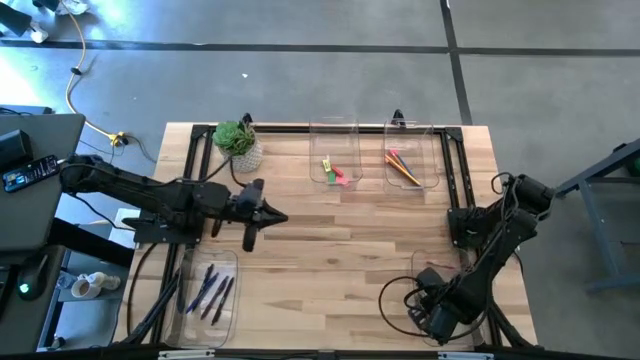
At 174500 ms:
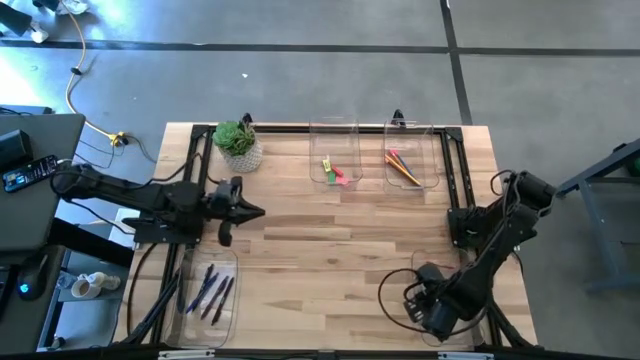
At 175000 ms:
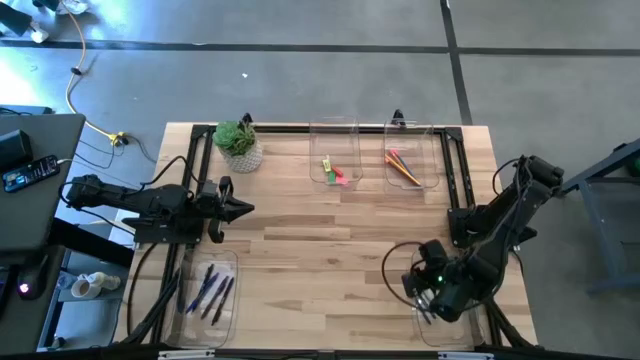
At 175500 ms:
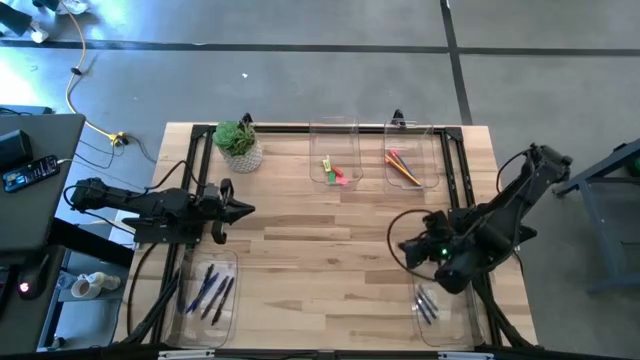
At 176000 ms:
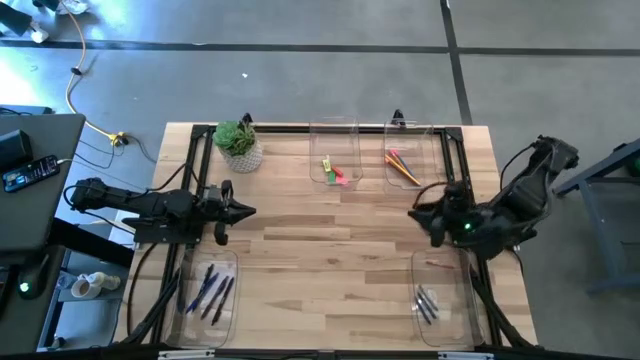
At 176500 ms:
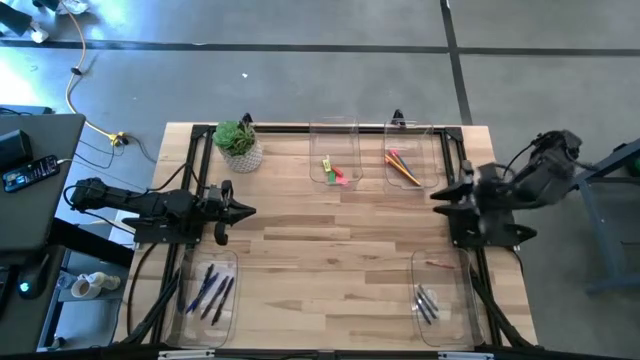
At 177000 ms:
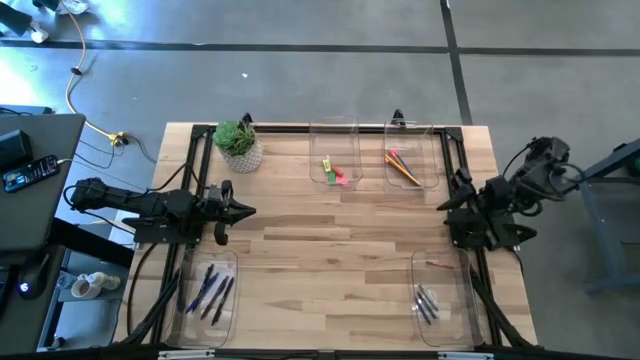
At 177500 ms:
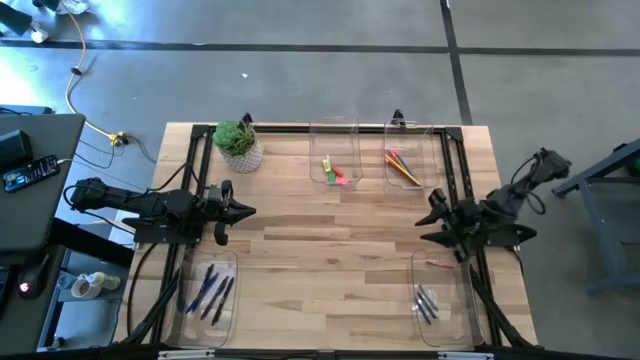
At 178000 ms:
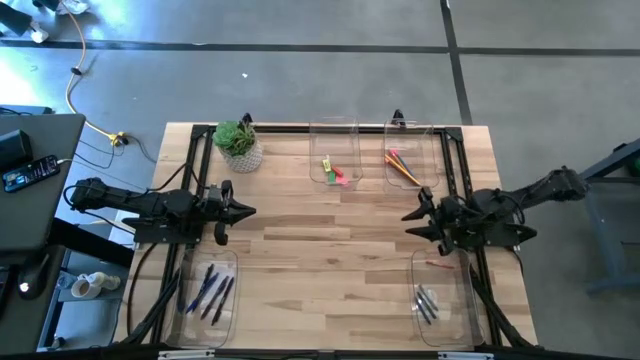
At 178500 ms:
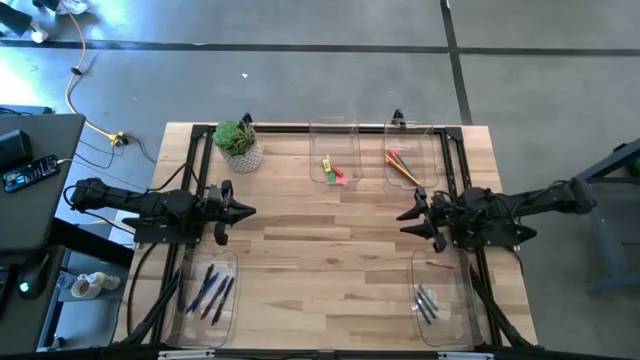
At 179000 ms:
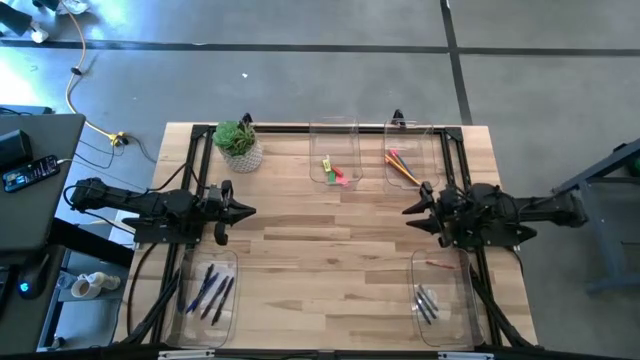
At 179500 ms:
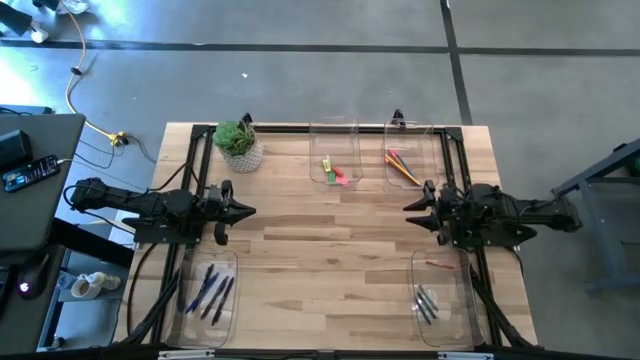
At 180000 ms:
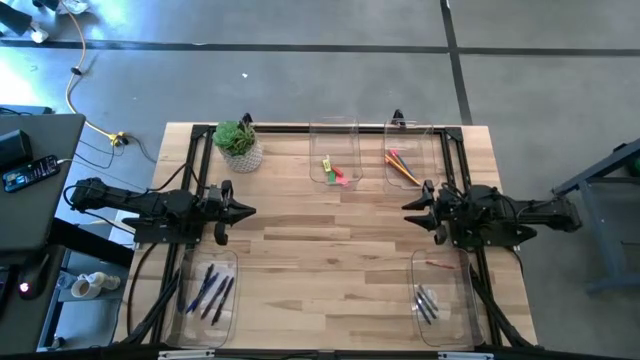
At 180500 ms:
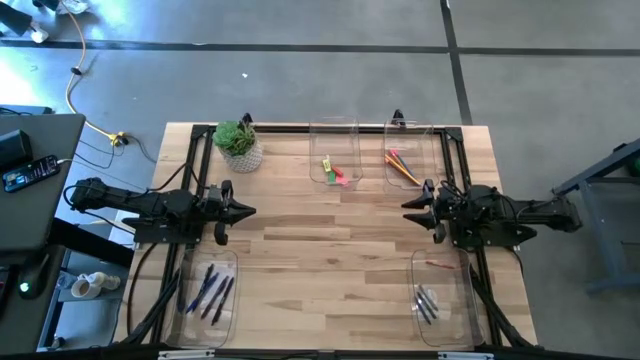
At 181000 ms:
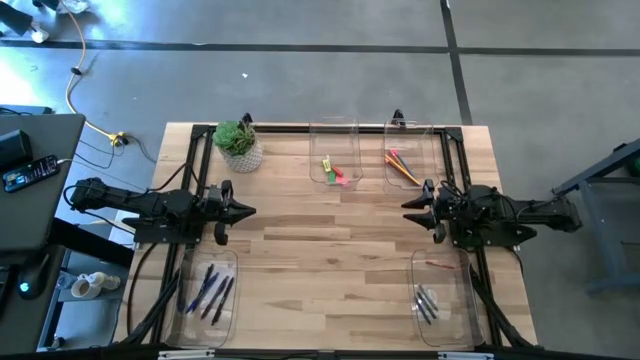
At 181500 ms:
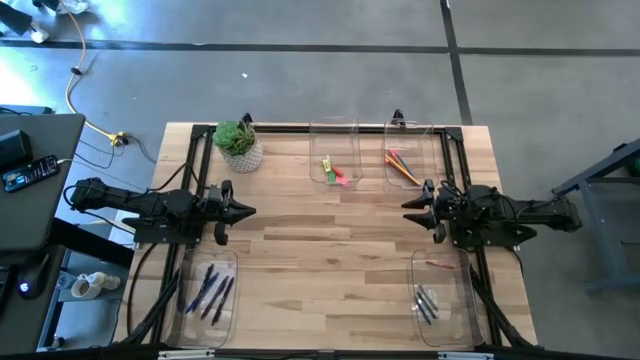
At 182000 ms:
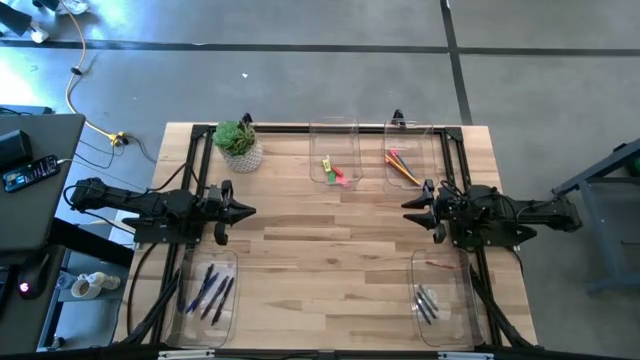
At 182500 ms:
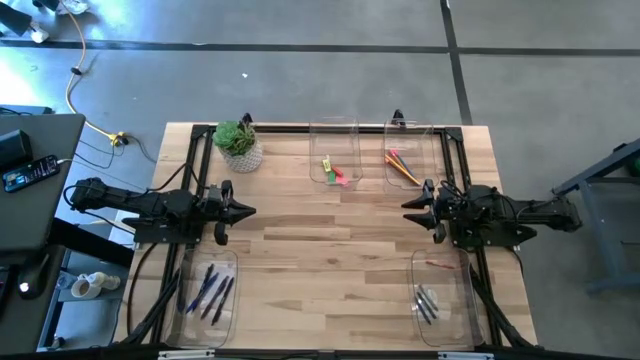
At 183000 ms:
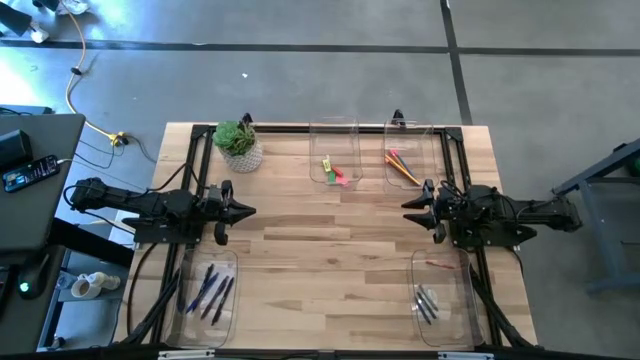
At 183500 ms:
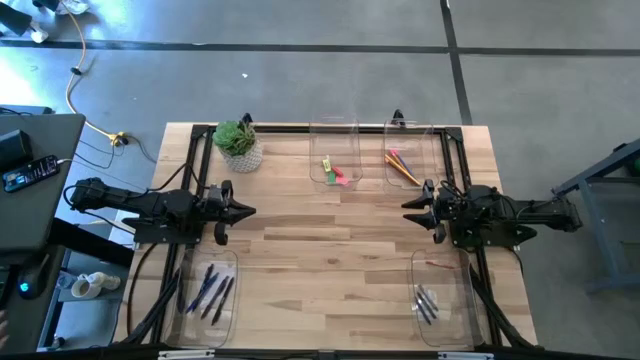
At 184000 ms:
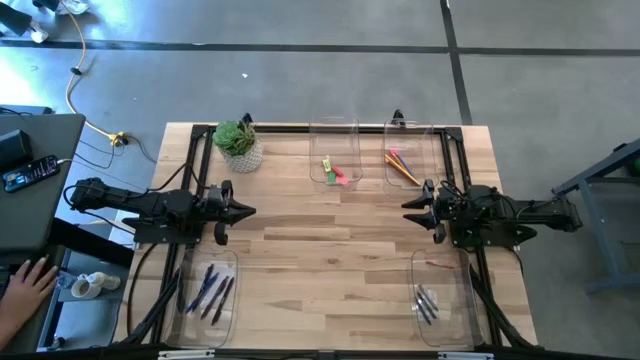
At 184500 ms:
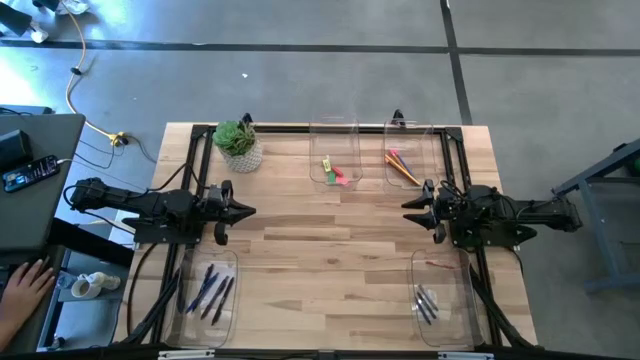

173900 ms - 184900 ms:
Task: Sort crayons/erasers/pens/pencils in bins
Return to Home Position

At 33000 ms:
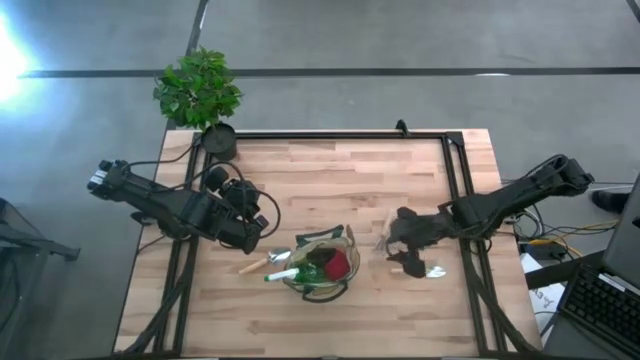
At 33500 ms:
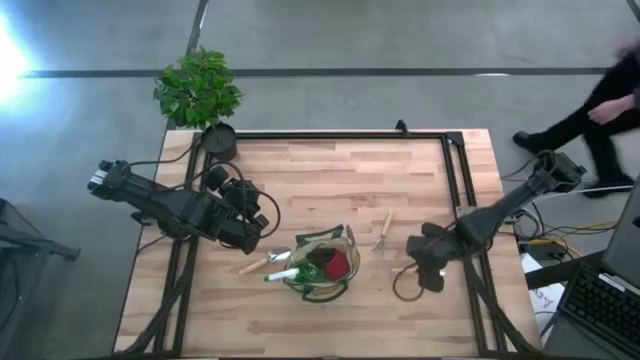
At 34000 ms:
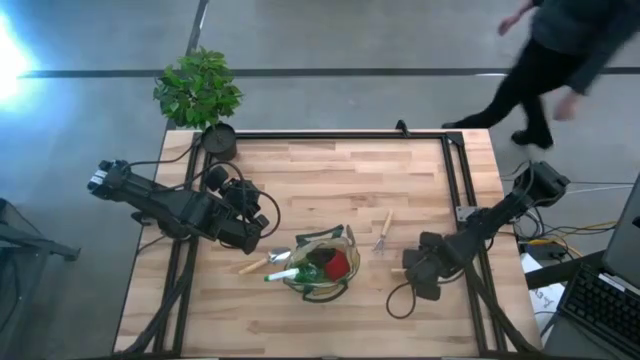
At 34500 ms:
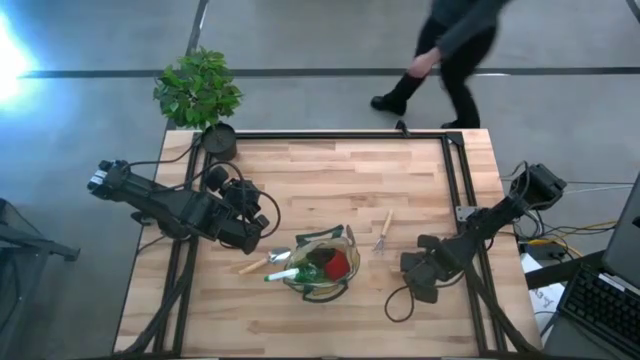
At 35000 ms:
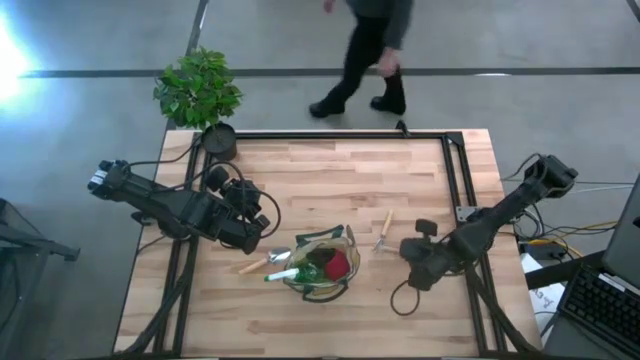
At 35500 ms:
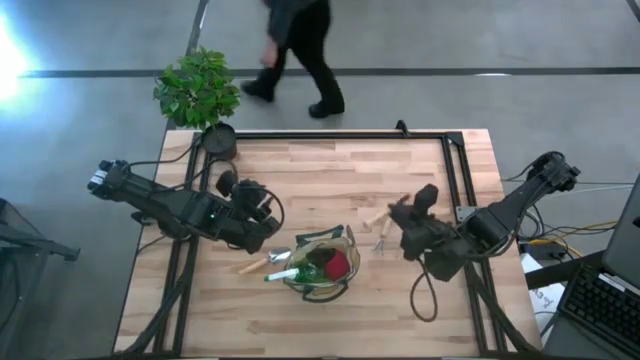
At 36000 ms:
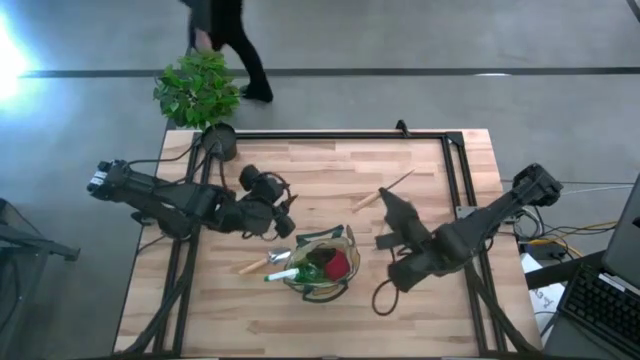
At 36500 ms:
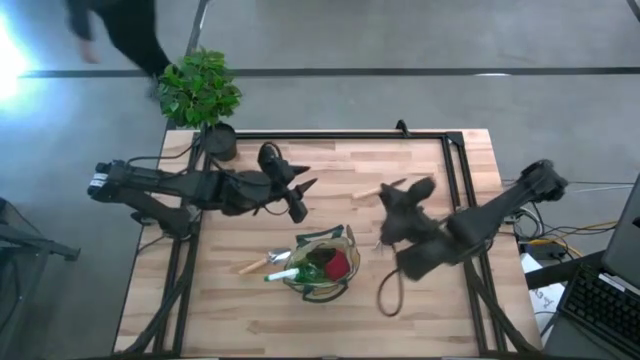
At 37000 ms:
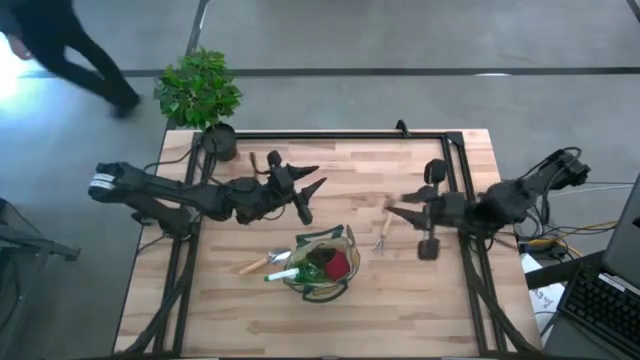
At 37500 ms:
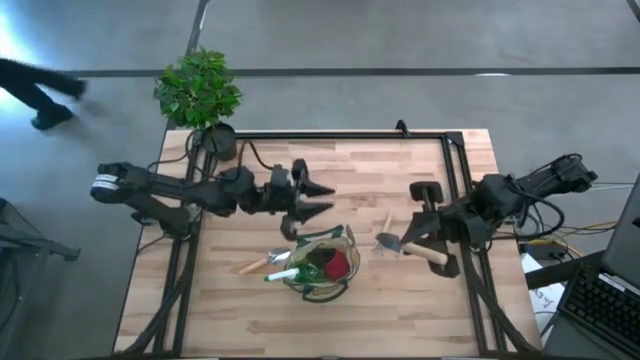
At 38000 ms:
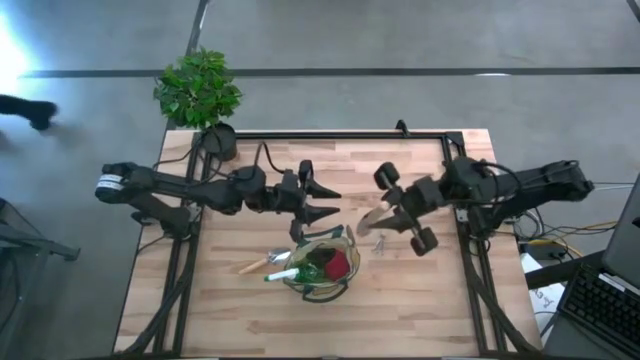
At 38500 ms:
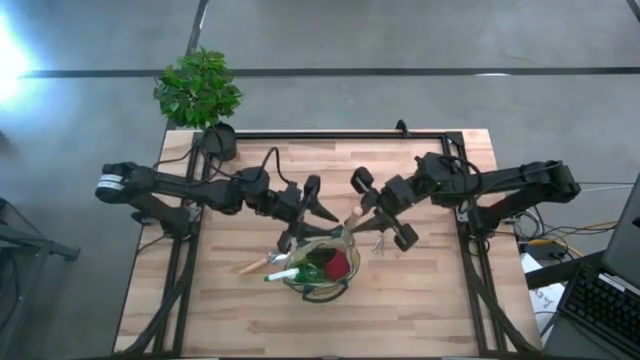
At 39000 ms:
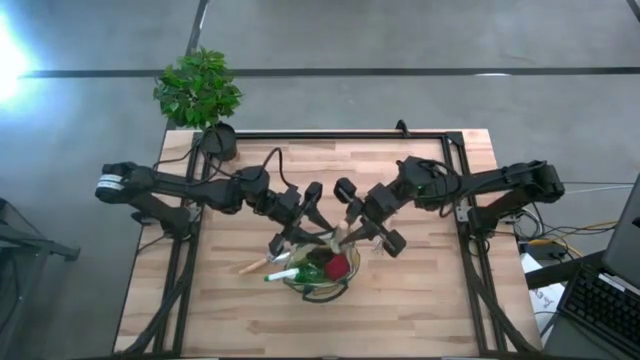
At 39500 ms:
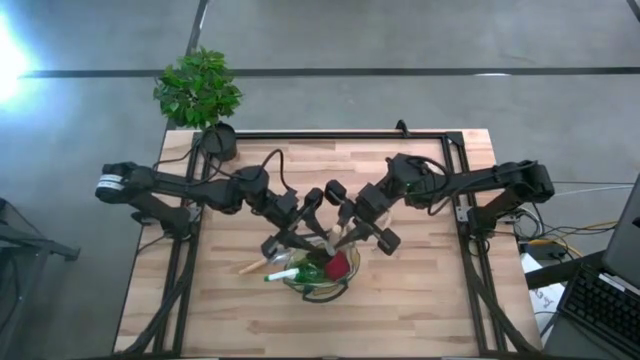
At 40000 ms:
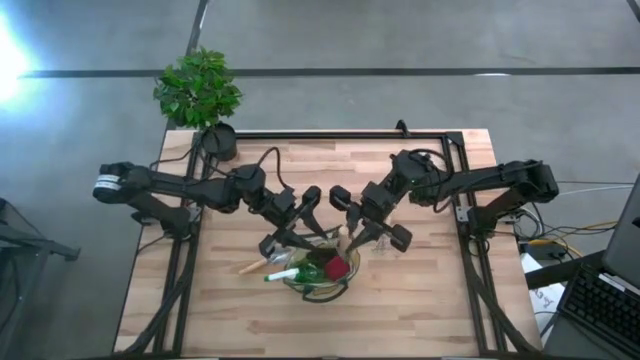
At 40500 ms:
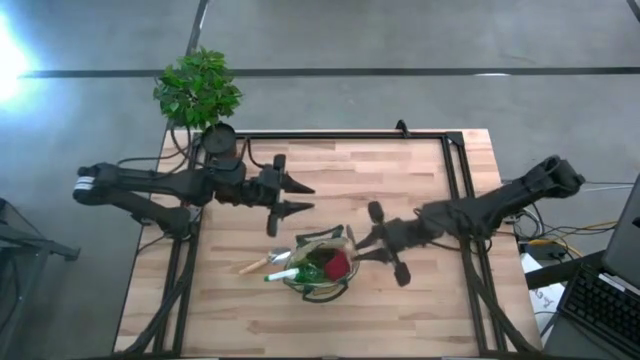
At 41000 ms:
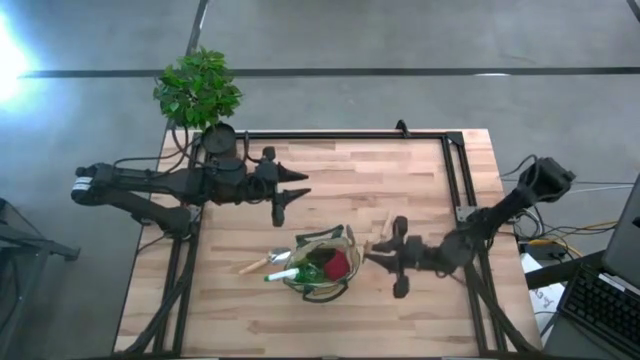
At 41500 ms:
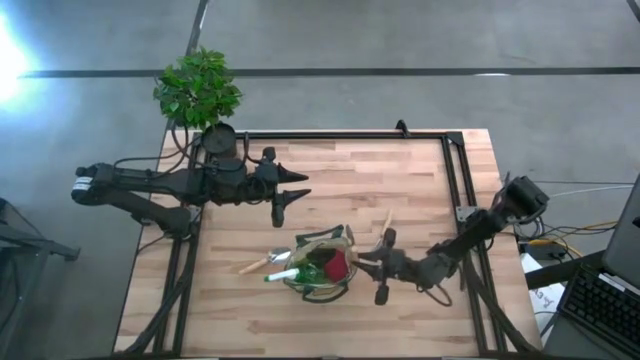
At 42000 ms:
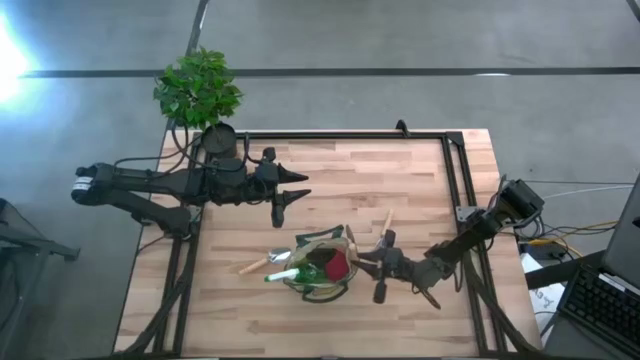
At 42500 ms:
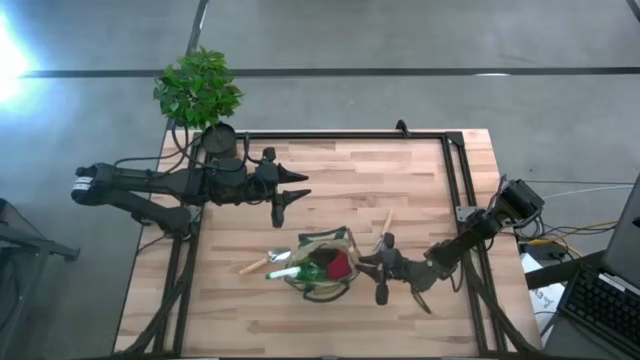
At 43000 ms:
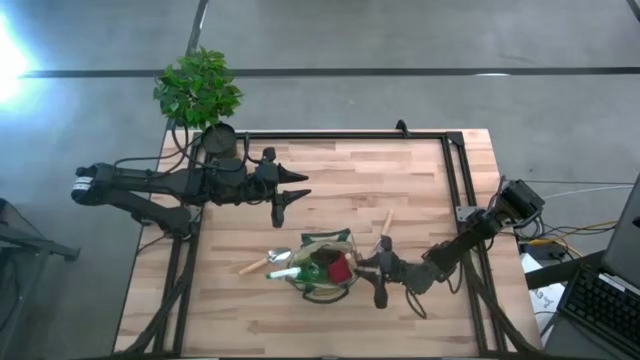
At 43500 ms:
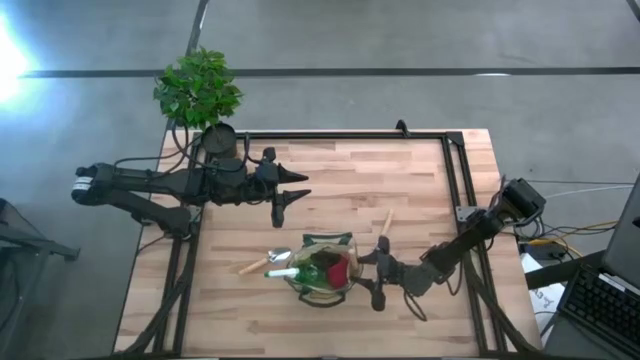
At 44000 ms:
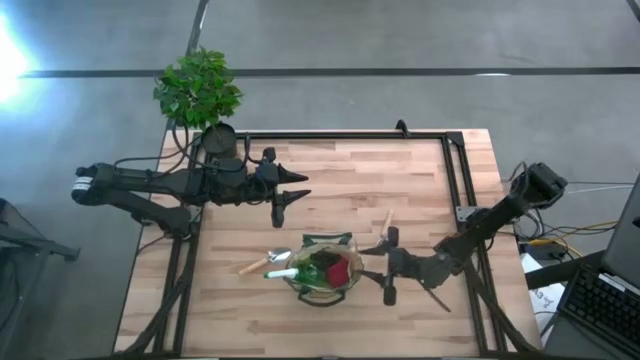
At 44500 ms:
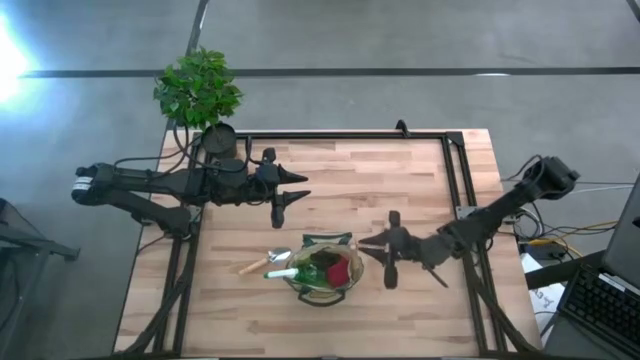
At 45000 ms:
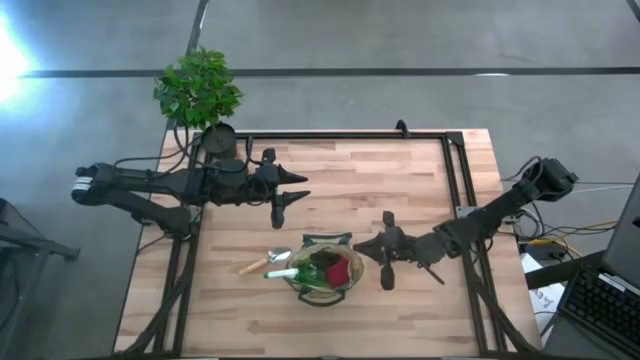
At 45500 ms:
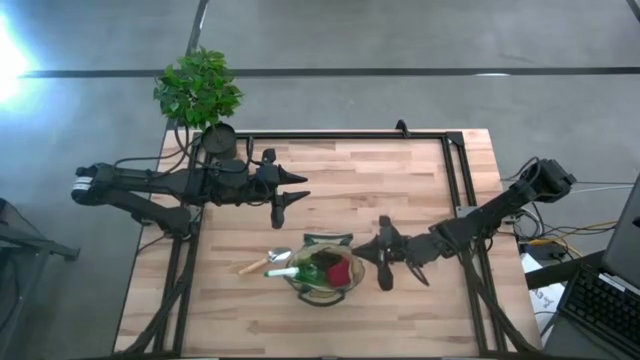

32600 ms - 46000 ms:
Task: Pick & Place Garden tools in Gardening bag
Put the right trowel into the gardening bag
